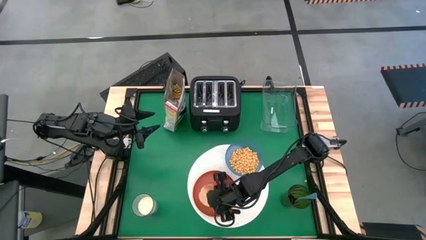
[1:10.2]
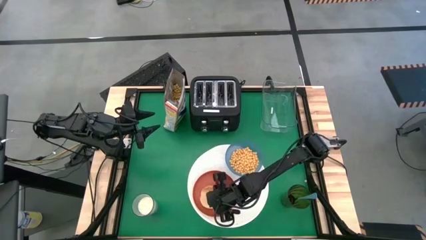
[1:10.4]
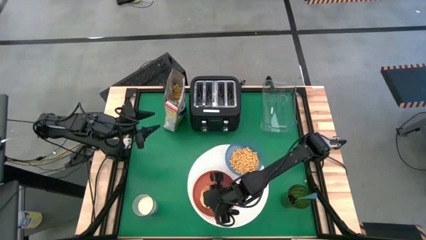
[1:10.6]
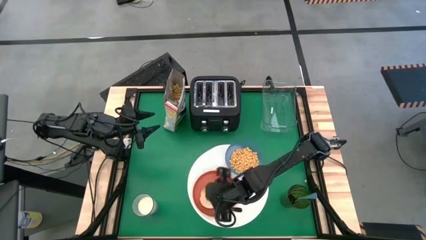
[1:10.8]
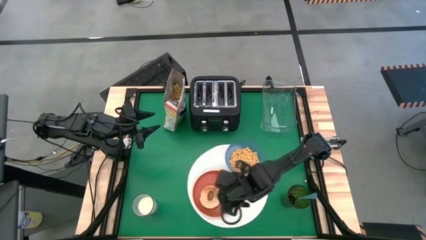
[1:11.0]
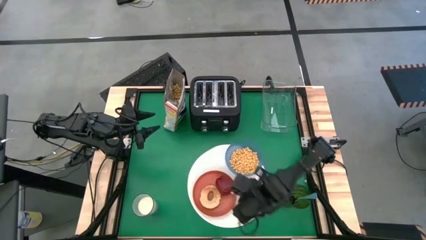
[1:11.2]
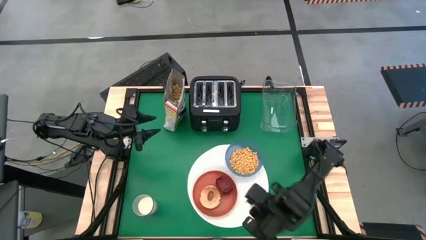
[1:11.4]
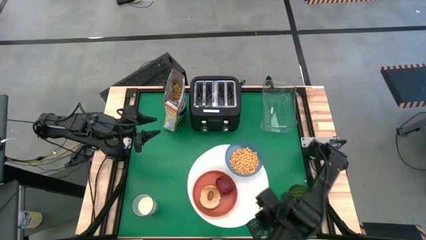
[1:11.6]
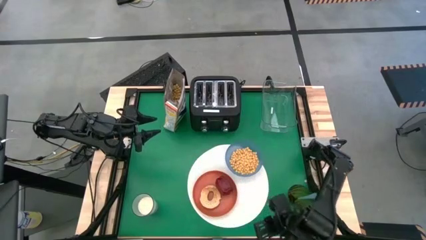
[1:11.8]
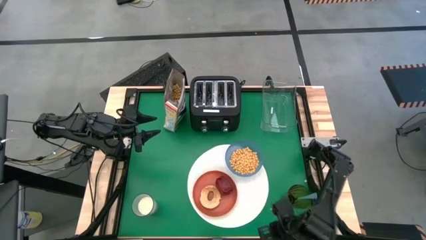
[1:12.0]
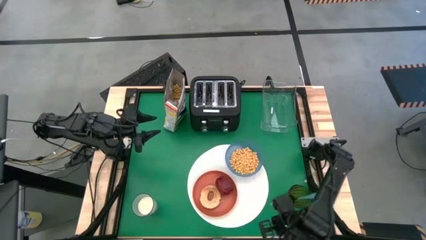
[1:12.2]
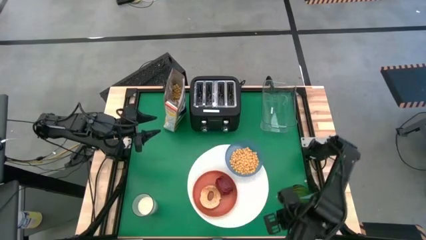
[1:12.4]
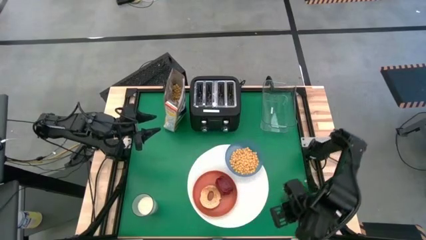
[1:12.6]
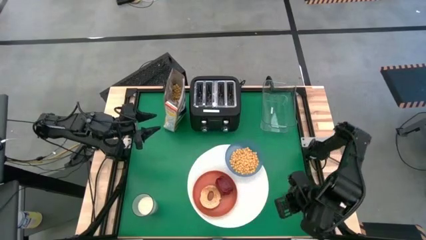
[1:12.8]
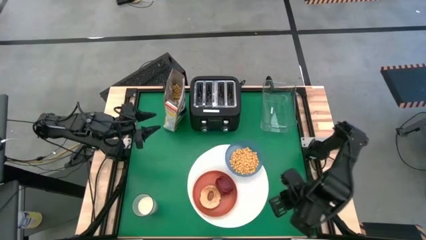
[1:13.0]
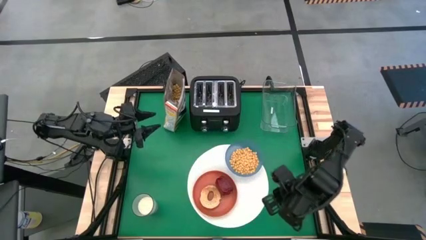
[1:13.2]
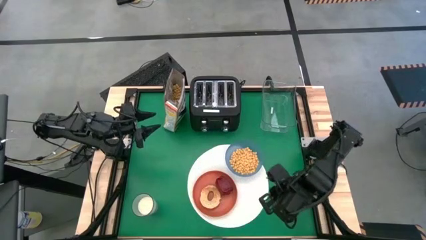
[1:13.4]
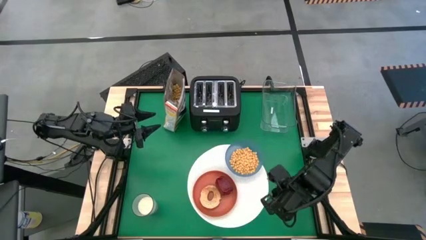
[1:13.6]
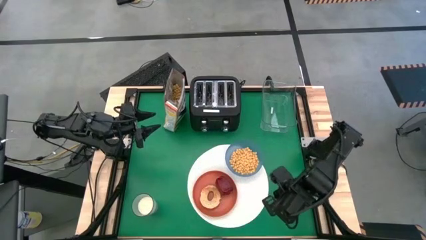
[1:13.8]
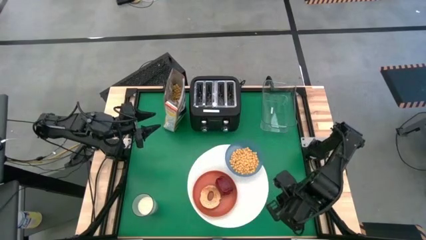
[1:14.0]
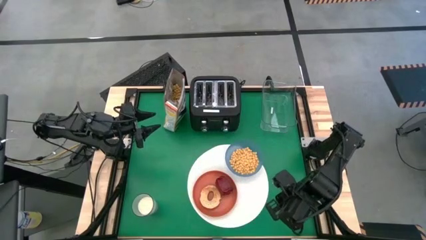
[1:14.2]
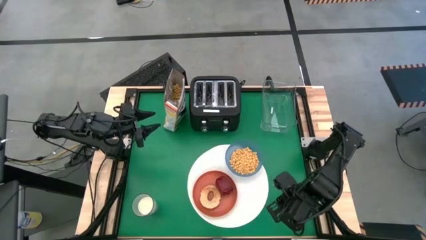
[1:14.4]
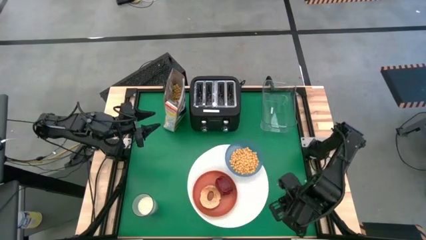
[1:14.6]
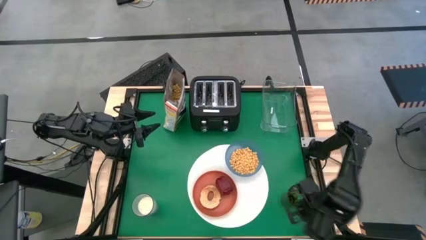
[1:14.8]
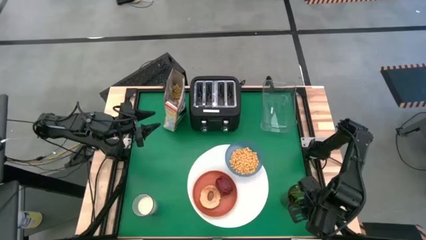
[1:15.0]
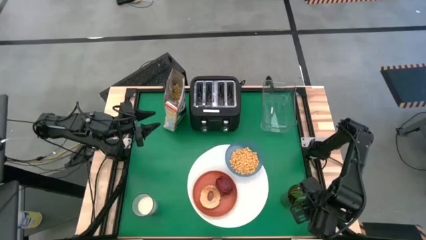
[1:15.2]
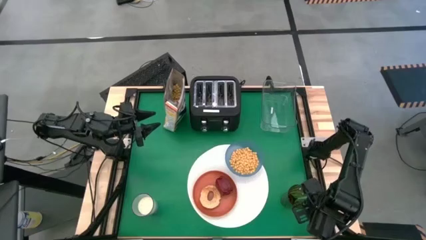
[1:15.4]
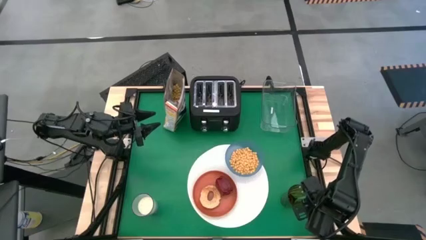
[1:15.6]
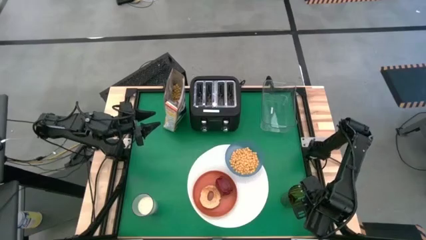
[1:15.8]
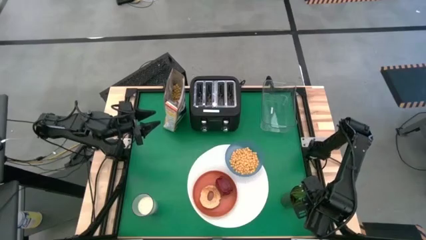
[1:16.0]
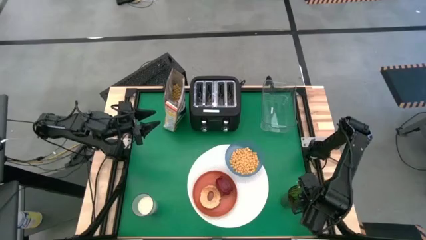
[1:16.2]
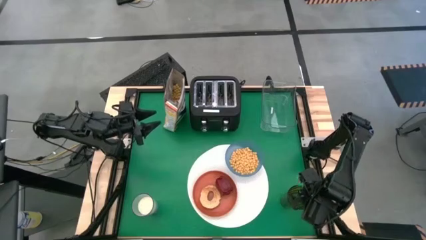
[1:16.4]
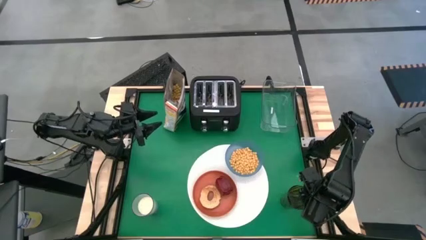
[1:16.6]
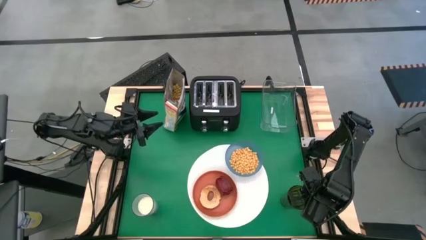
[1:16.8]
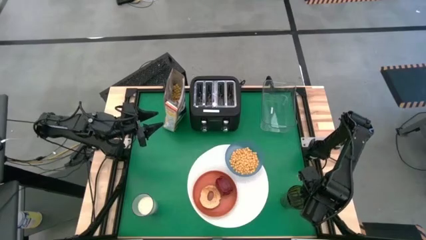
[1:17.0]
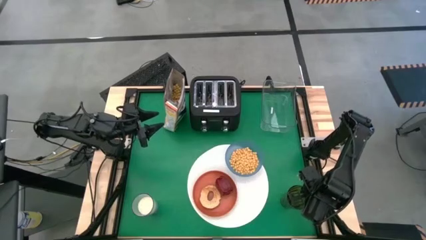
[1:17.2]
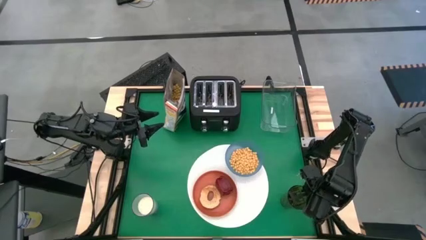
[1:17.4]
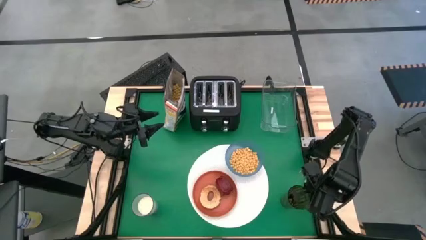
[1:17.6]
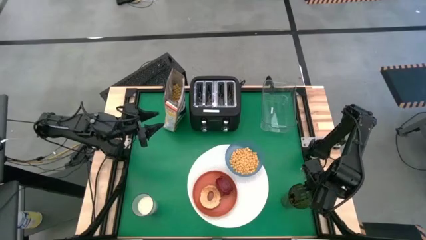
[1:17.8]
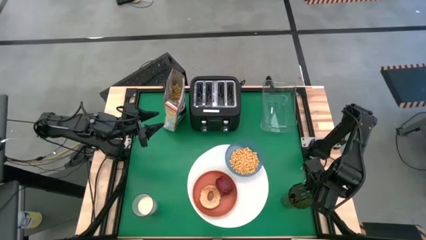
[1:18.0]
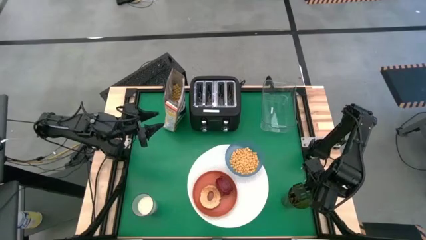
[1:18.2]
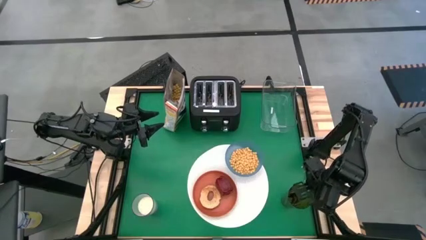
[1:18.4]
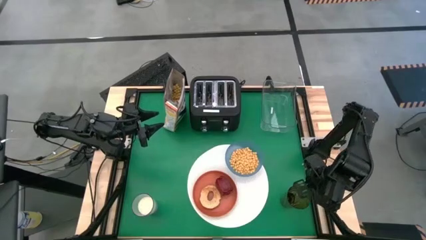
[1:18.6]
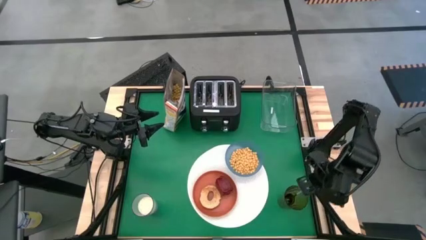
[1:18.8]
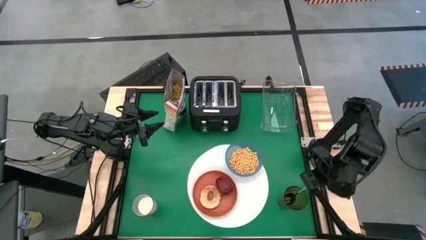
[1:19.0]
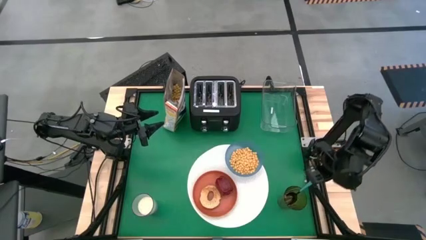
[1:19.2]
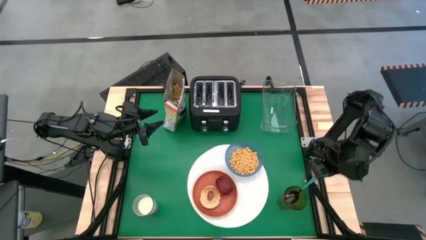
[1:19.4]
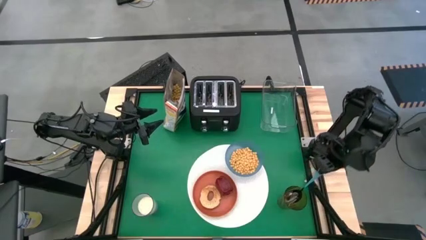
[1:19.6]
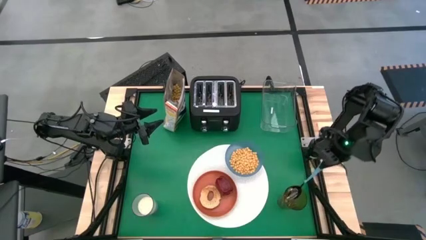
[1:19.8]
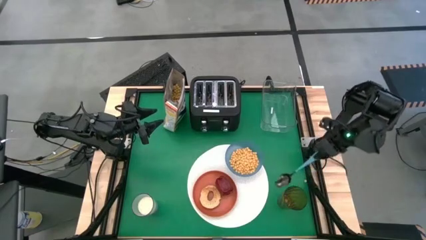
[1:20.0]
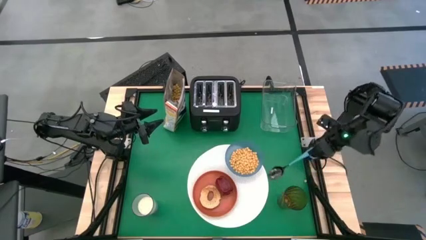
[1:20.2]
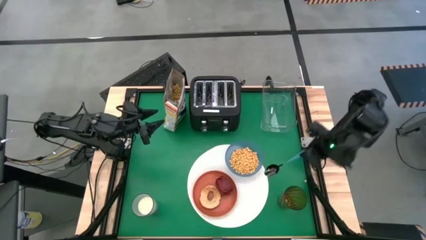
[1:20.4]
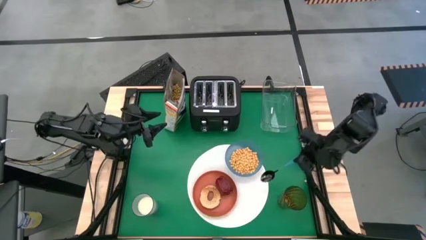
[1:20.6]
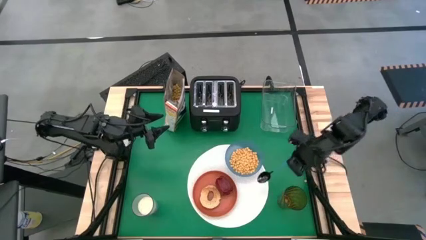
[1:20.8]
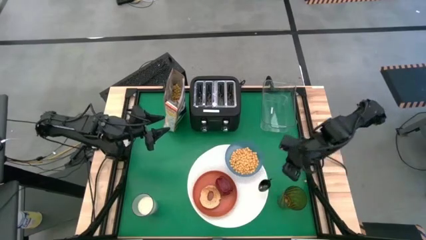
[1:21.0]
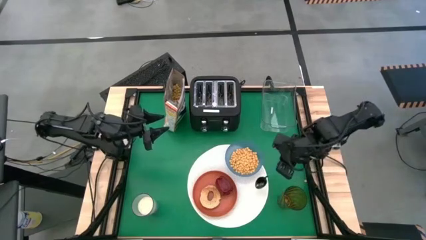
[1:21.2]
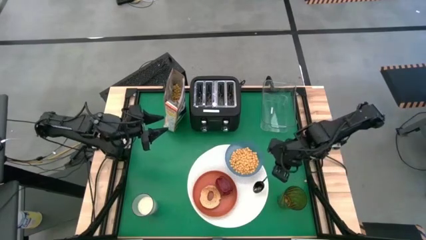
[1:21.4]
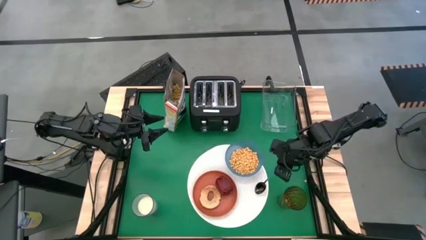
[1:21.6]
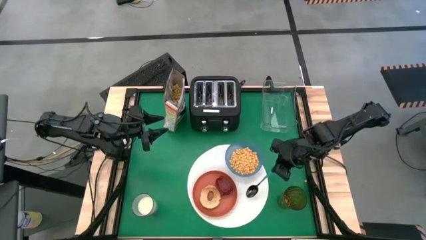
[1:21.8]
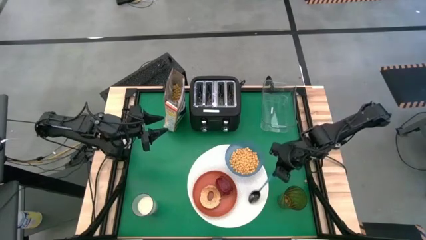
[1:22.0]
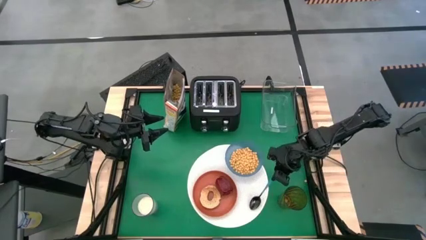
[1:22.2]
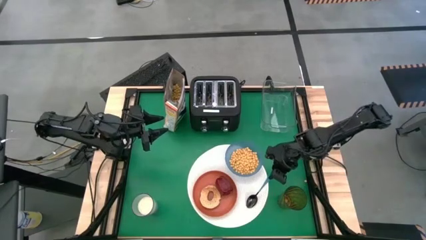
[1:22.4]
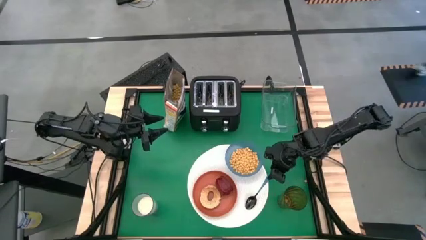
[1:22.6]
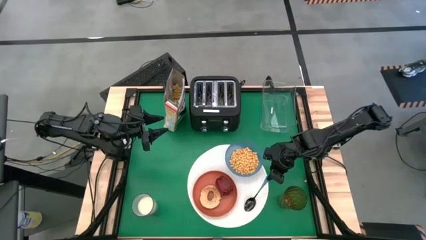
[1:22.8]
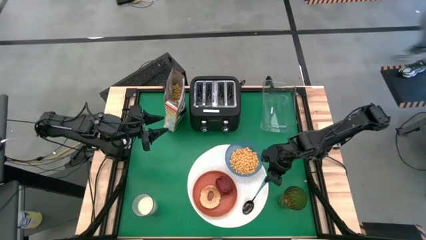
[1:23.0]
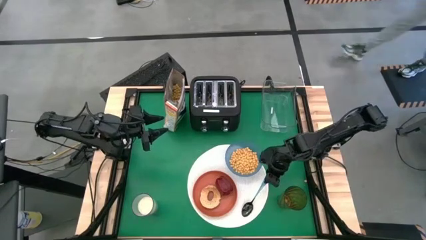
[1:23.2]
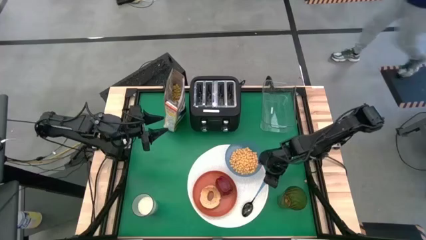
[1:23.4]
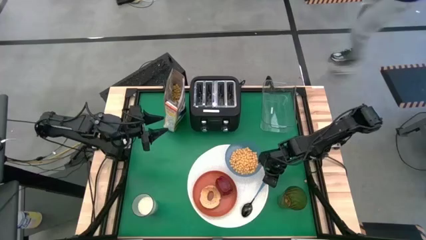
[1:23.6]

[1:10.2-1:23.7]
Task: Arrange a breakfast setting
Put the blue spoon on the white table mat
